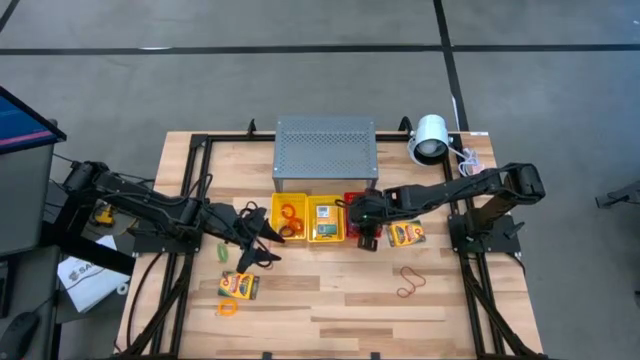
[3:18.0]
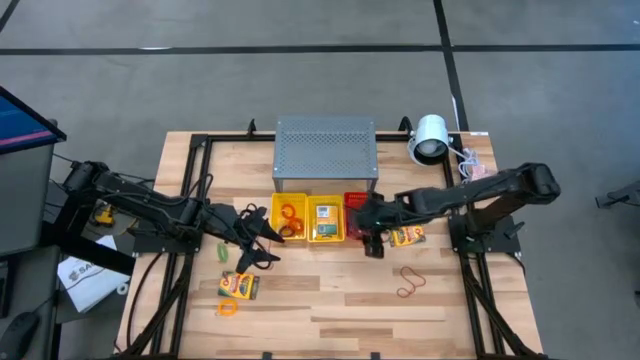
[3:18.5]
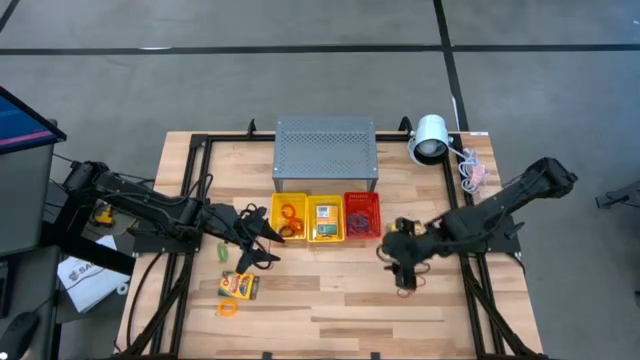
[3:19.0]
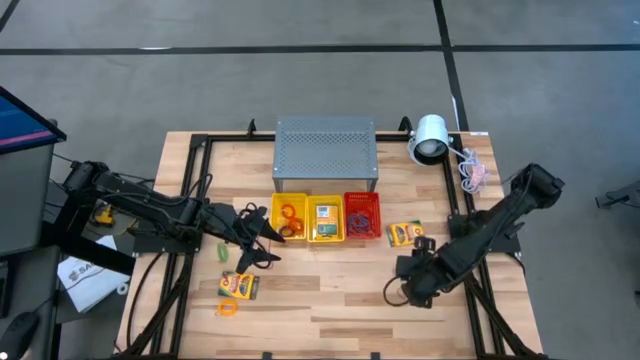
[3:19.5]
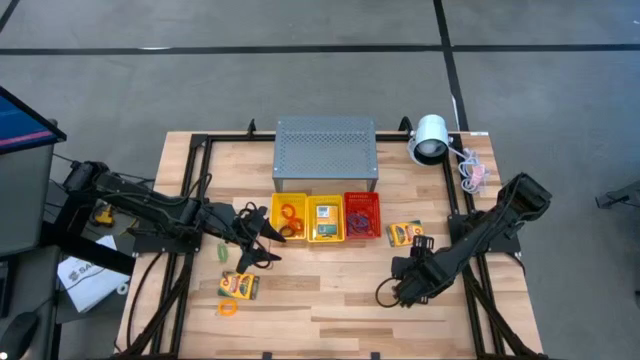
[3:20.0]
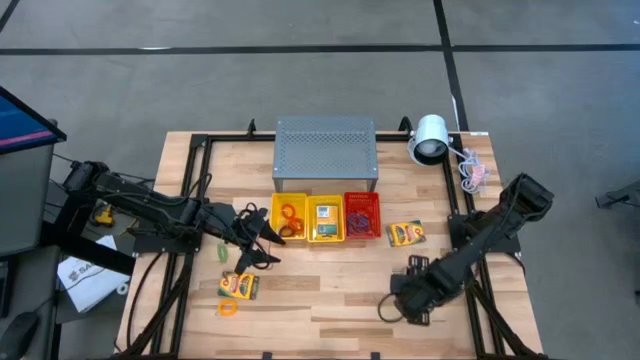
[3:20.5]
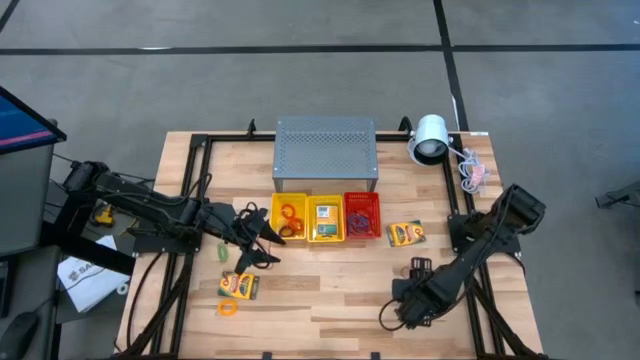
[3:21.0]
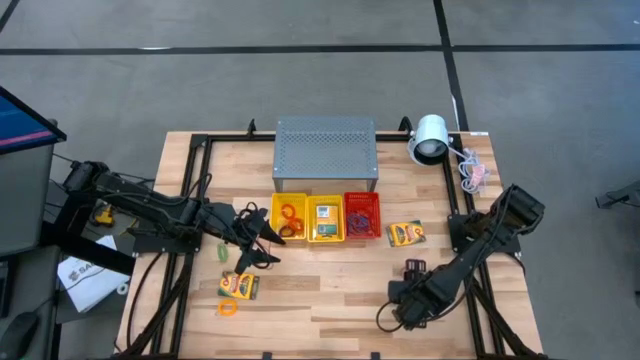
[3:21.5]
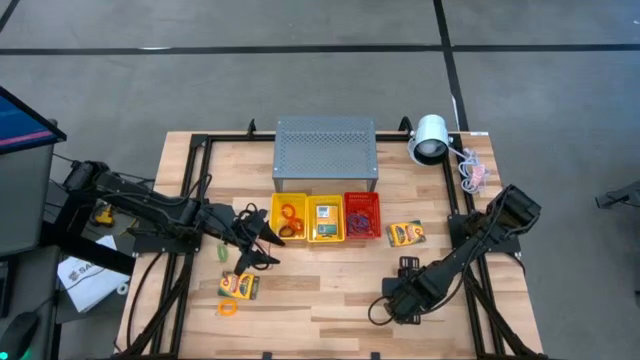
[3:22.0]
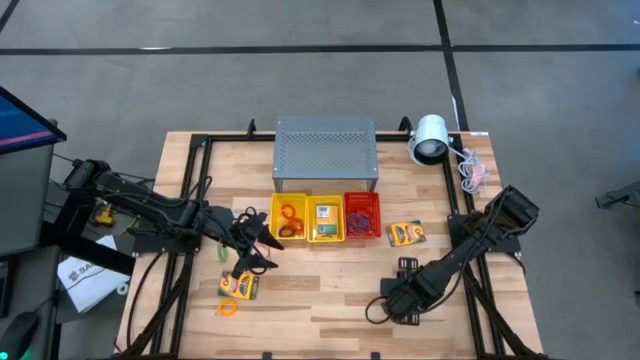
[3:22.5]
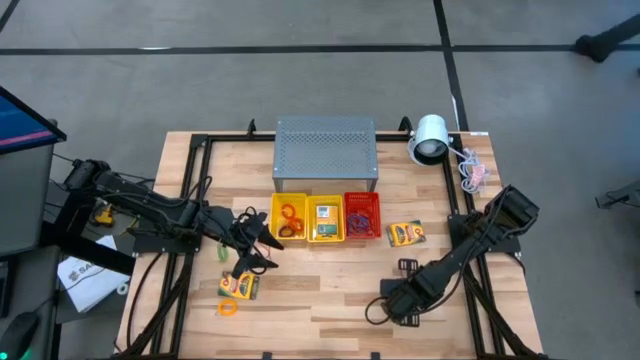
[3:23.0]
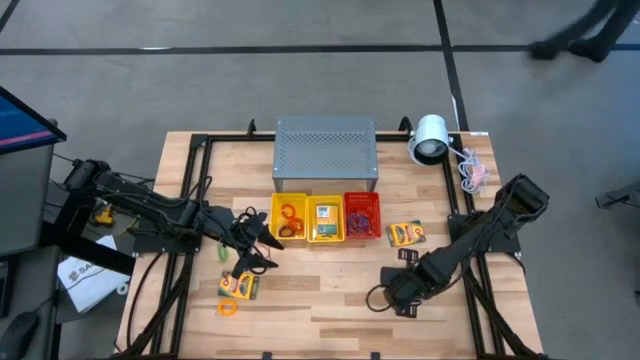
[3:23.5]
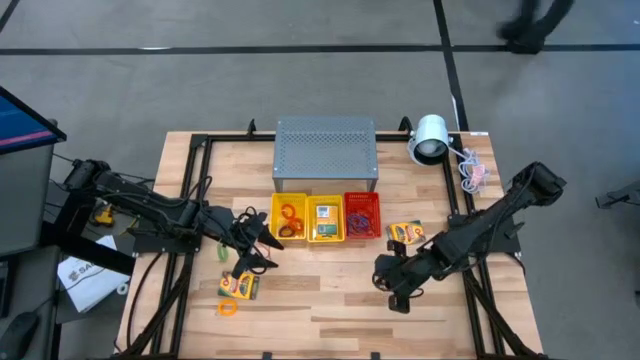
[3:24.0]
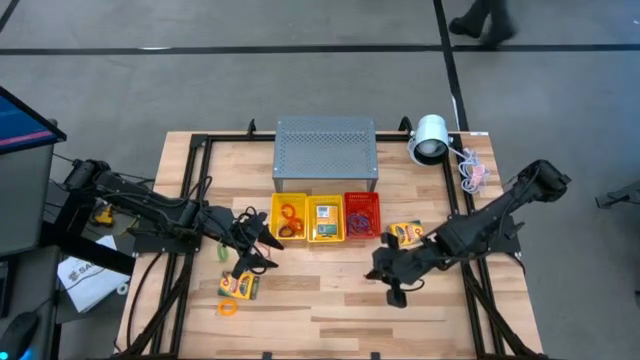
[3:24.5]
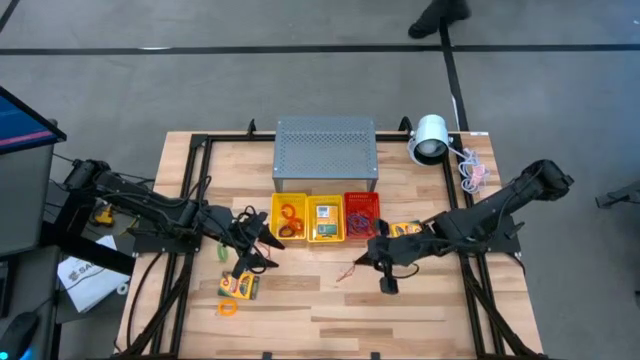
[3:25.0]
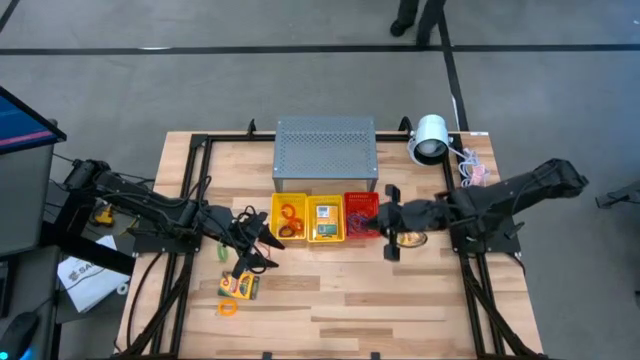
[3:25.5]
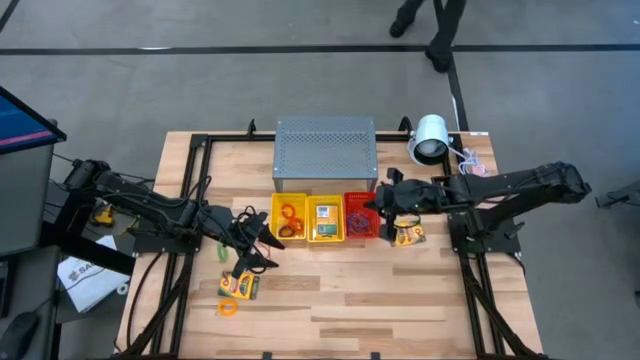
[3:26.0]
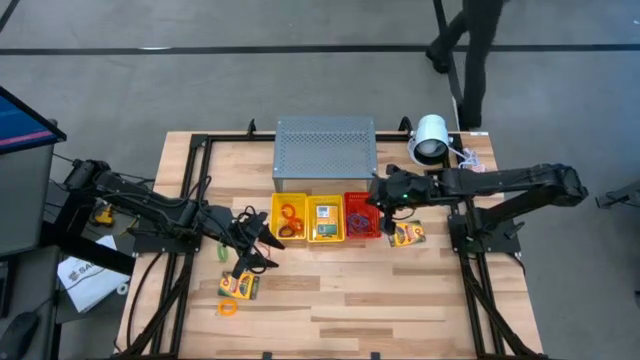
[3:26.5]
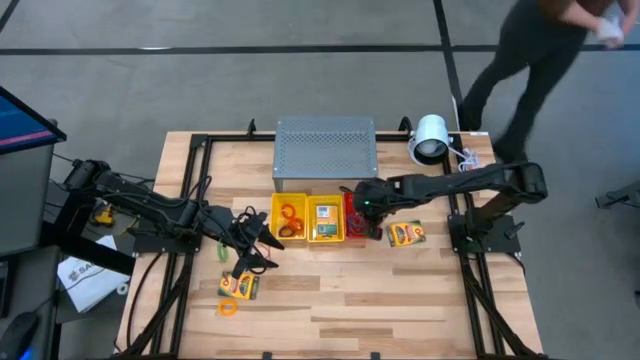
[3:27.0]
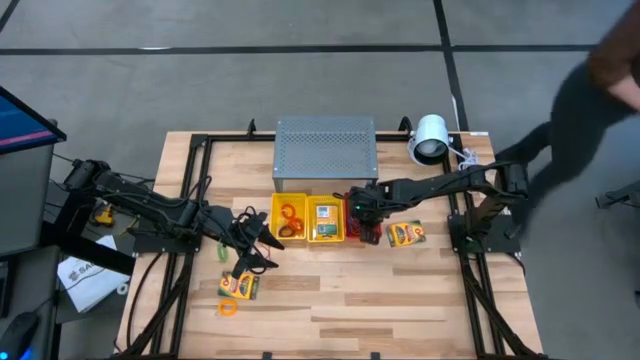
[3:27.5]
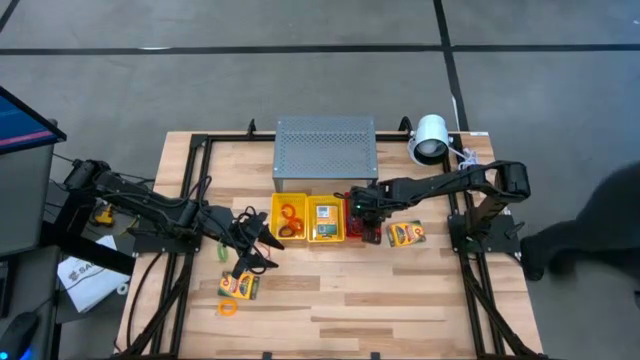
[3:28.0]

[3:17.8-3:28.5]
Task: Pick & Place Office Desk Supplies
Put the red rubber band into the red bin

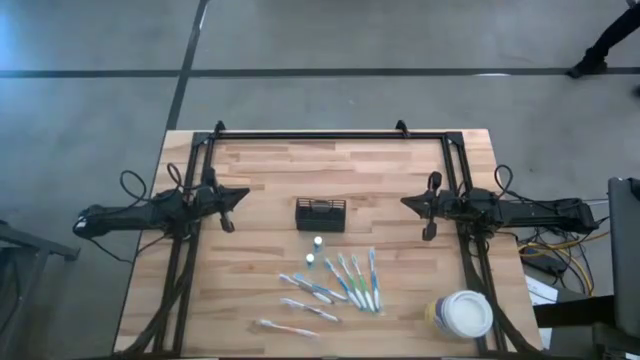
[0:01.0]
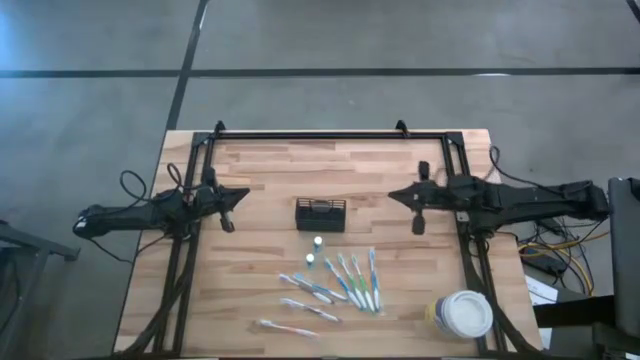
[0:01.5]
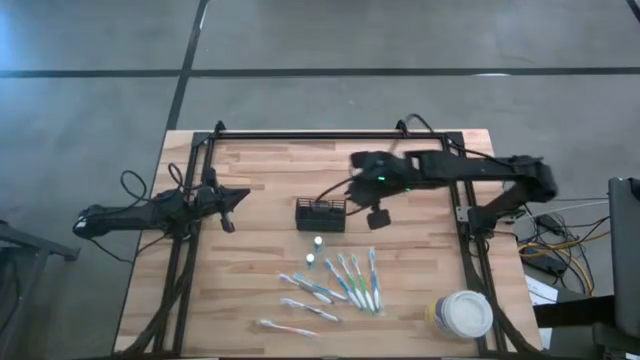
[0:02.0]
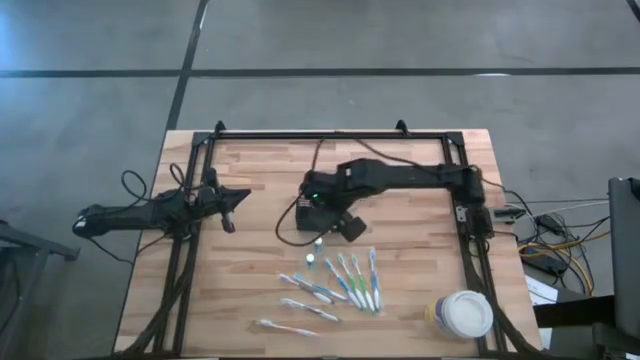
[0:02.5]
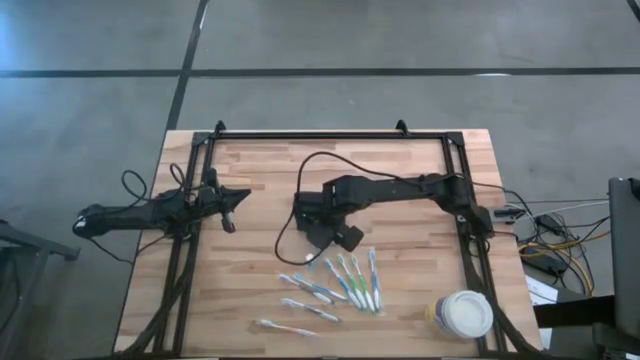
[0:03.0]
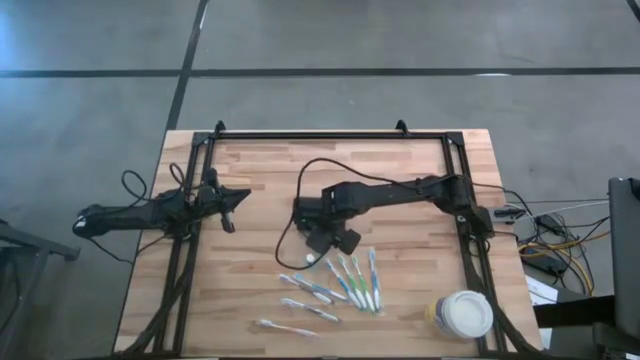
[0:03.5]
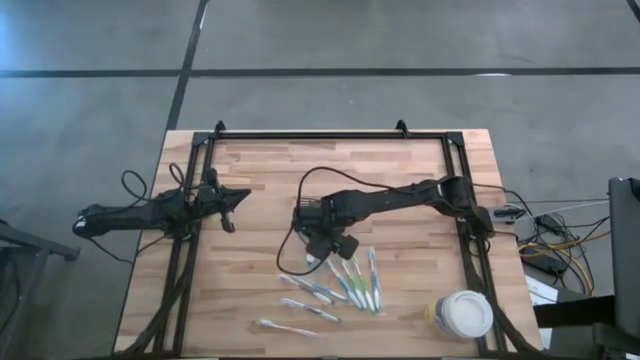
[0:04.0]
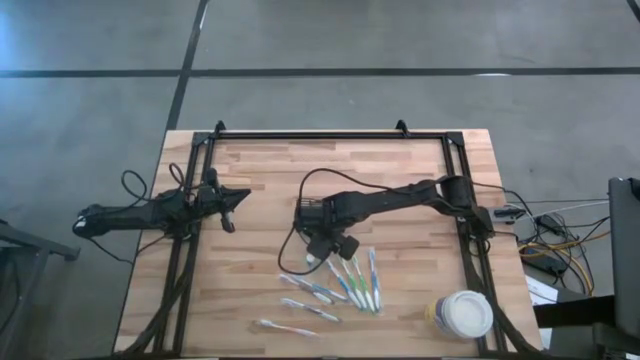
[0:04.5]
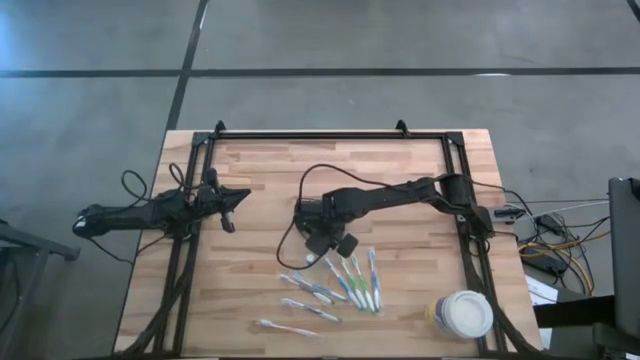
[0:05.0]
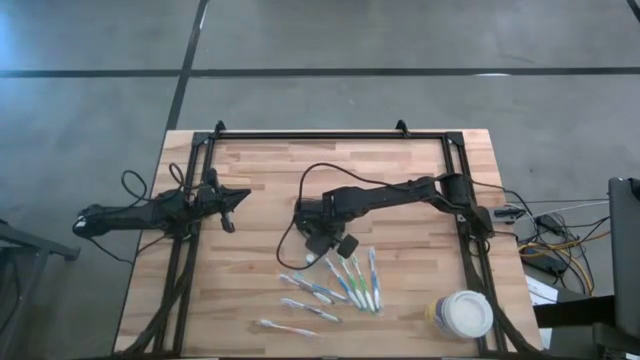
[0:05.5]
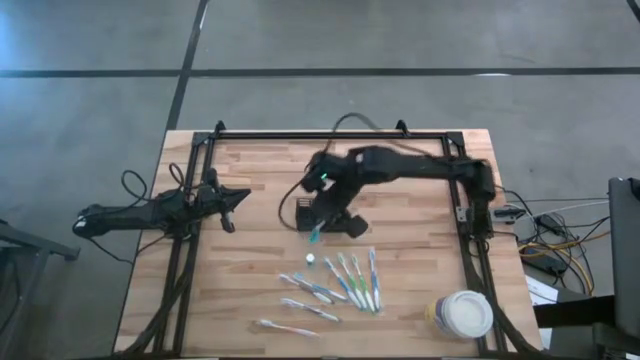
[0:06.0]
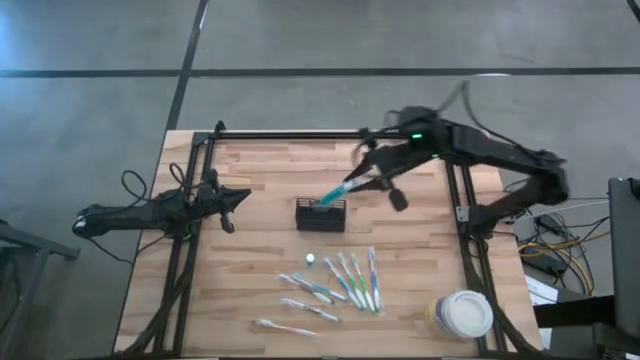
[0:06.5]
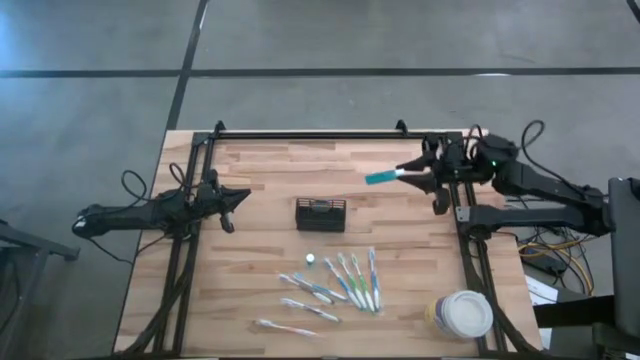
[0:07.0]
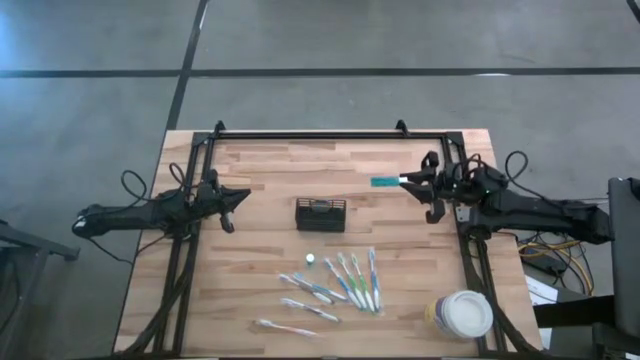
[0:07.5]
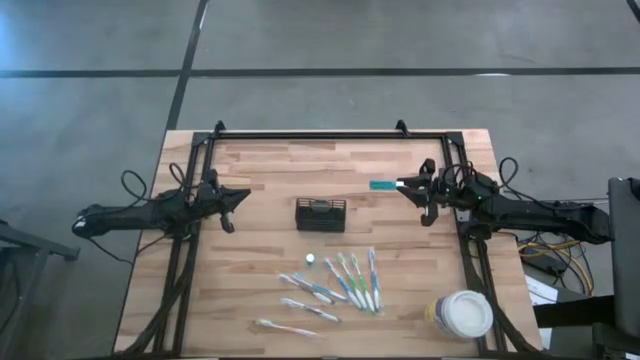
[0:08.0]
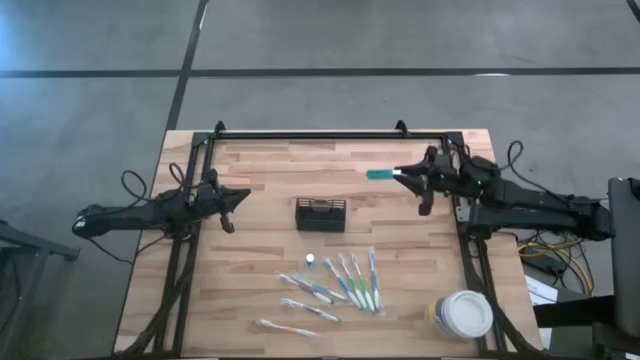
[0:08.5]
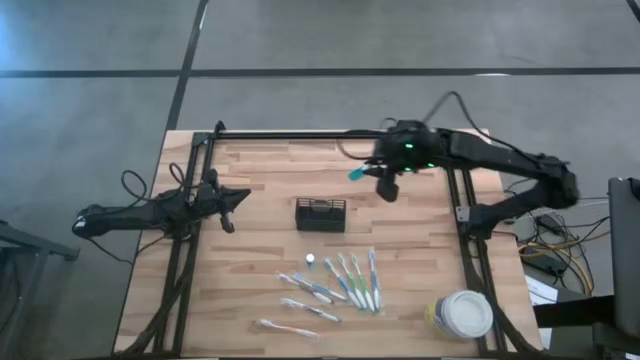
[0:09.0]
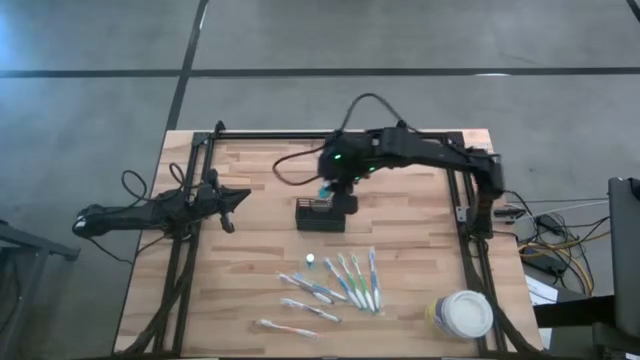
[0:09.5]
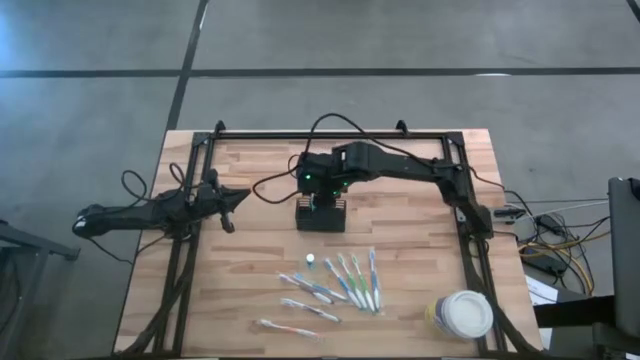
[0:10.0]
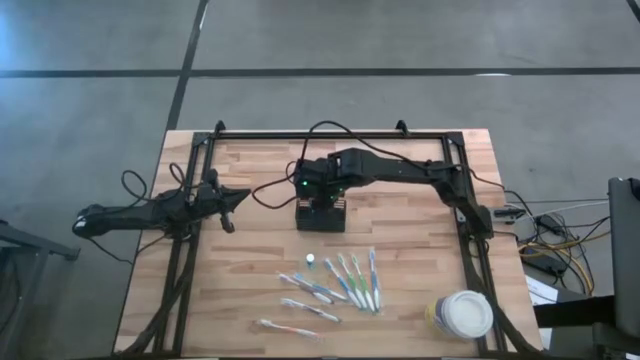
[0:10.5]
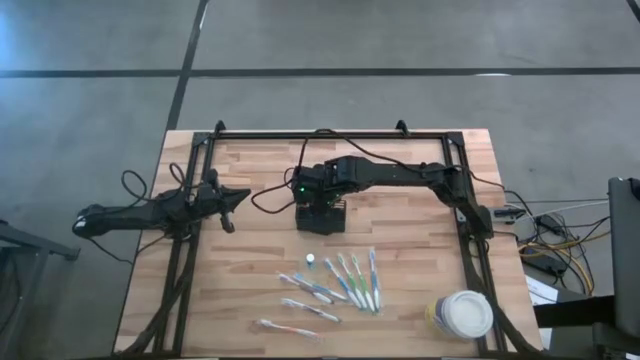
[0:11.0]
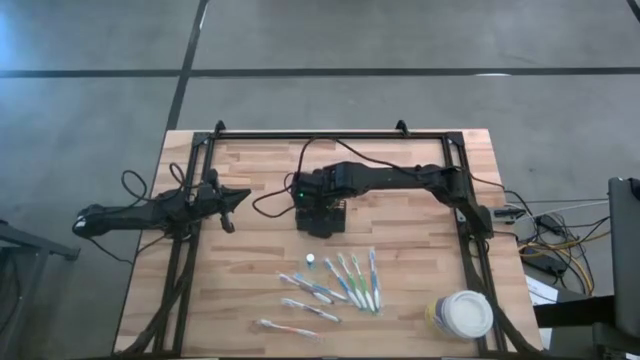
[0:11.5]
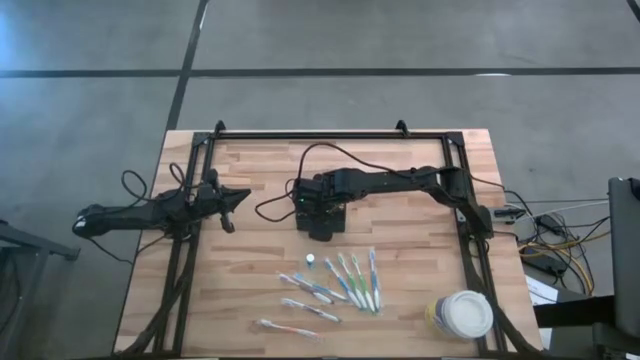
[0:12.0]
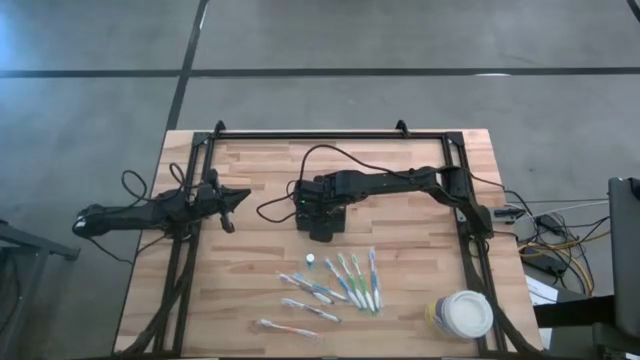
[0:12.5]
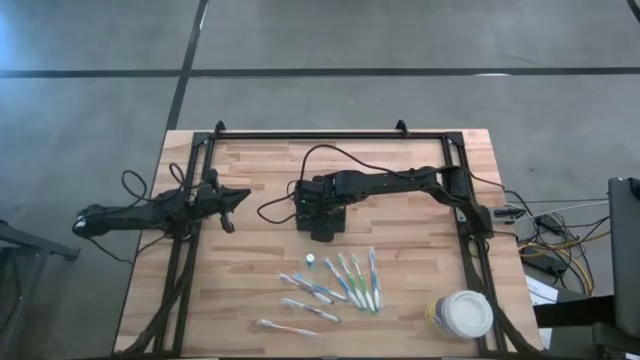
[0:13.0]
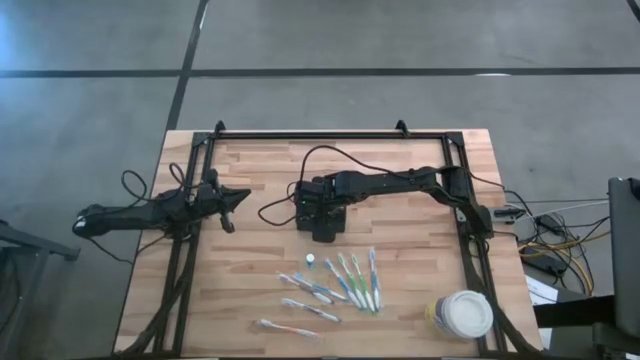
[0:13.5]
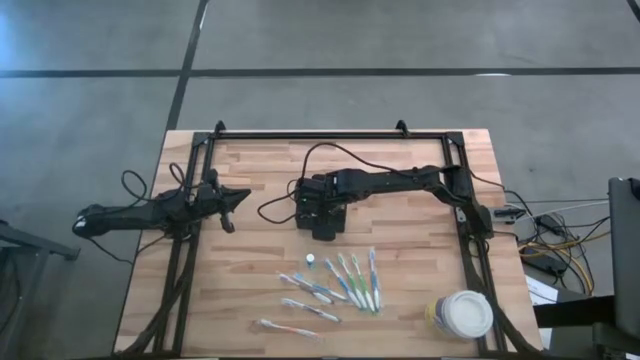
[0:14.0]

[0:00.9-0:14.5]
Task: Pick & Place toothbrushing station
Put the top mouthwash into the wire organizer
